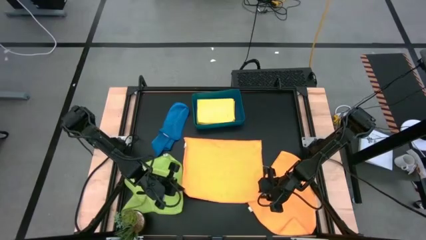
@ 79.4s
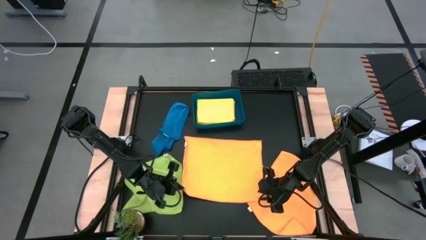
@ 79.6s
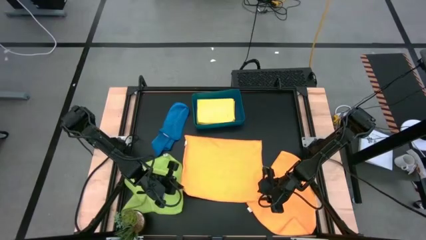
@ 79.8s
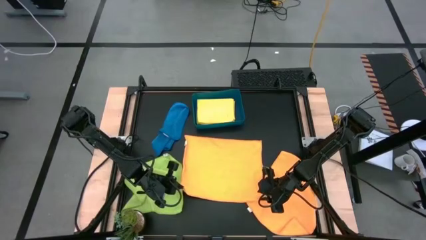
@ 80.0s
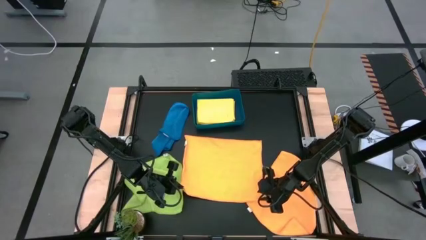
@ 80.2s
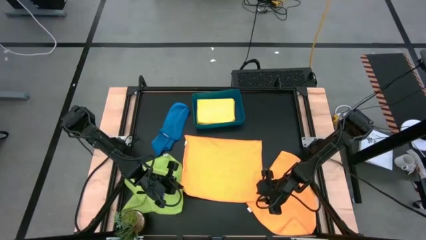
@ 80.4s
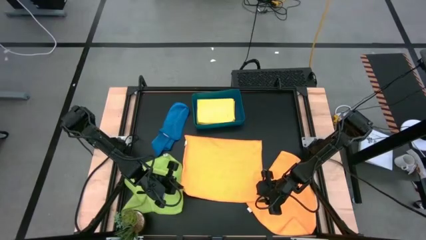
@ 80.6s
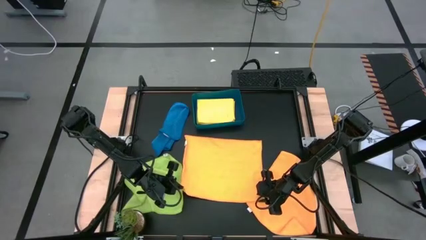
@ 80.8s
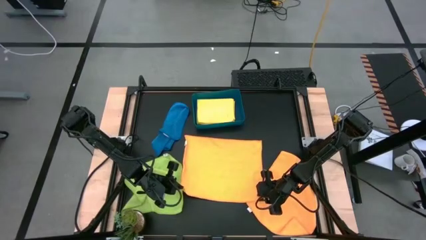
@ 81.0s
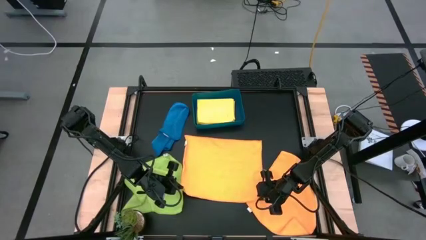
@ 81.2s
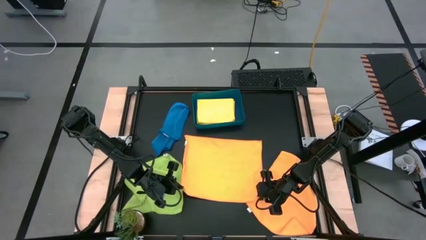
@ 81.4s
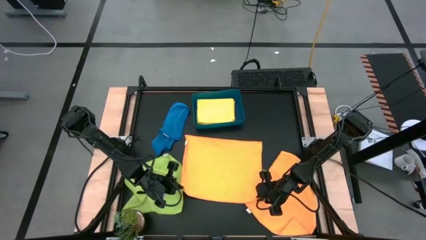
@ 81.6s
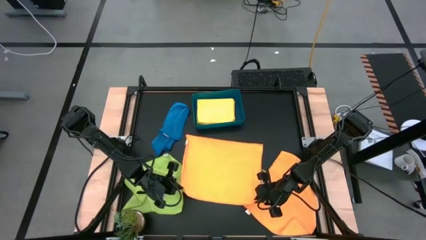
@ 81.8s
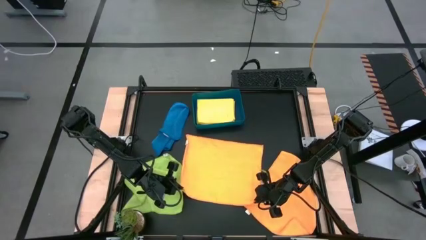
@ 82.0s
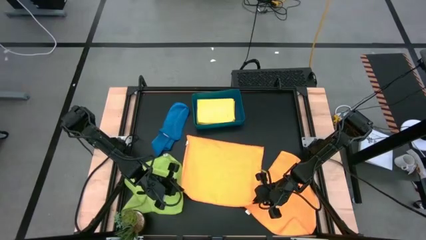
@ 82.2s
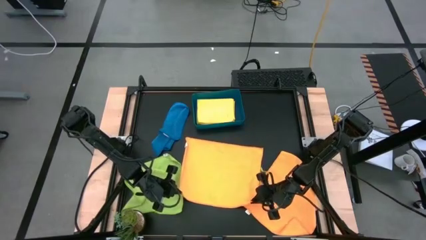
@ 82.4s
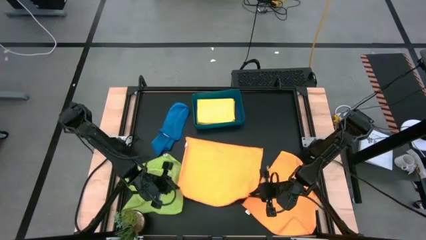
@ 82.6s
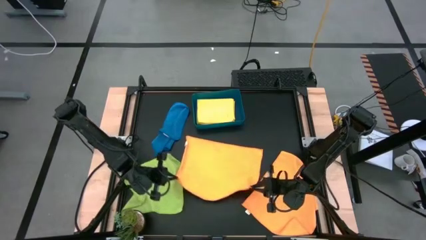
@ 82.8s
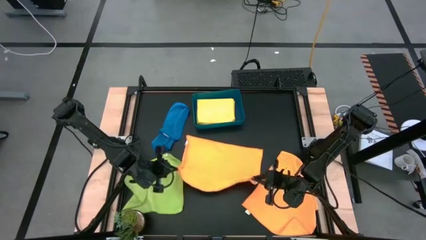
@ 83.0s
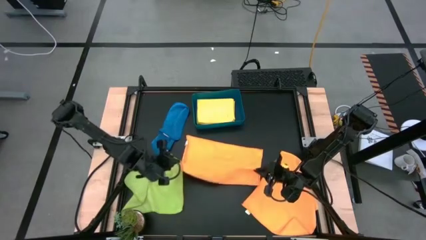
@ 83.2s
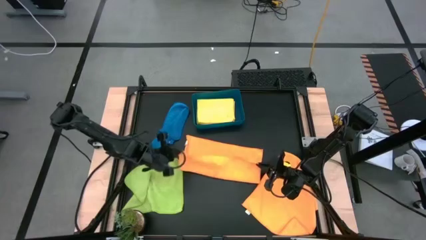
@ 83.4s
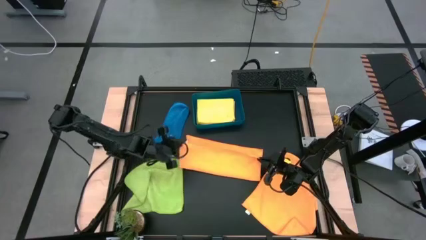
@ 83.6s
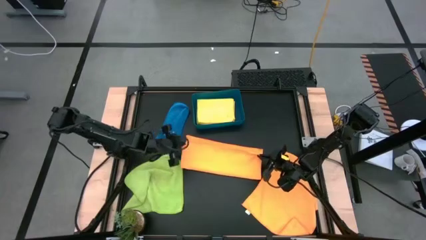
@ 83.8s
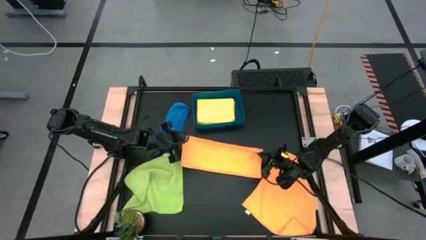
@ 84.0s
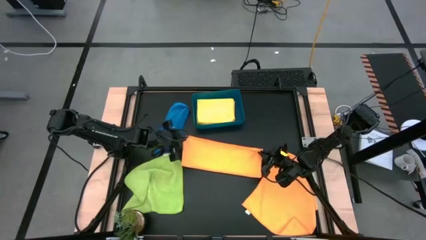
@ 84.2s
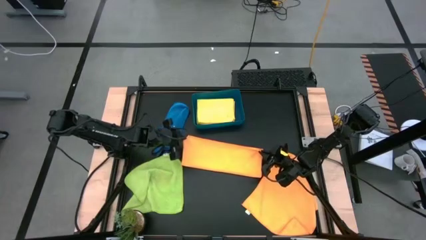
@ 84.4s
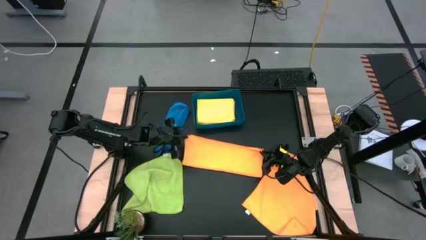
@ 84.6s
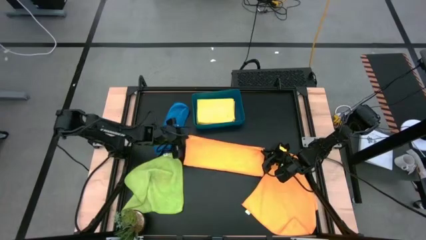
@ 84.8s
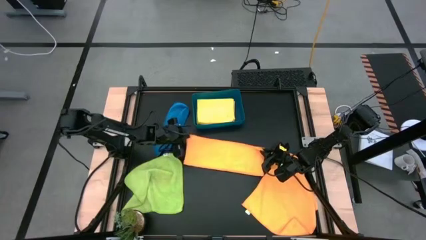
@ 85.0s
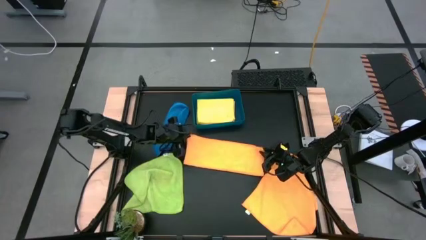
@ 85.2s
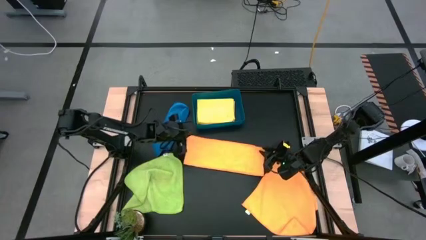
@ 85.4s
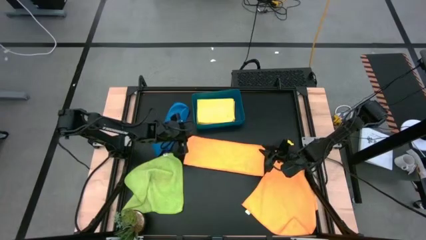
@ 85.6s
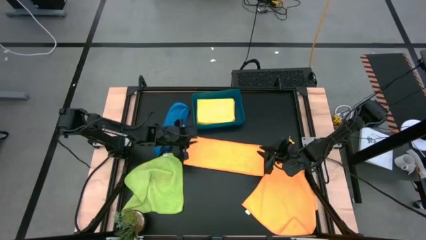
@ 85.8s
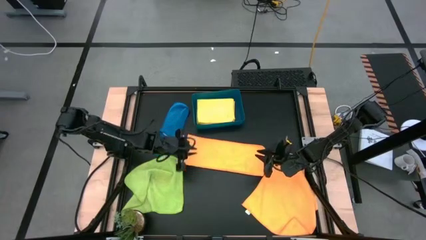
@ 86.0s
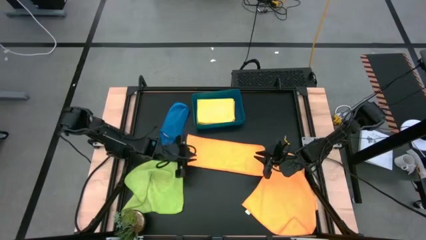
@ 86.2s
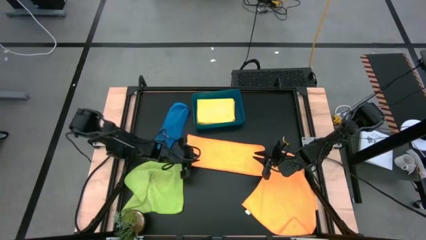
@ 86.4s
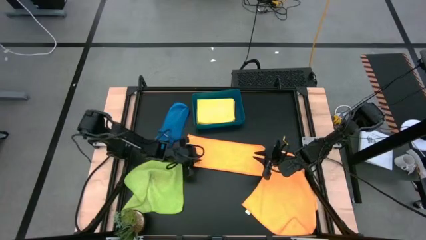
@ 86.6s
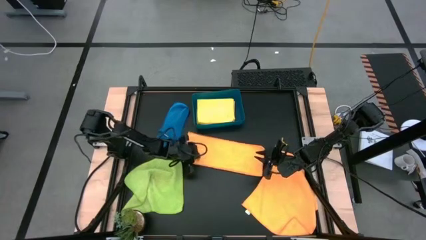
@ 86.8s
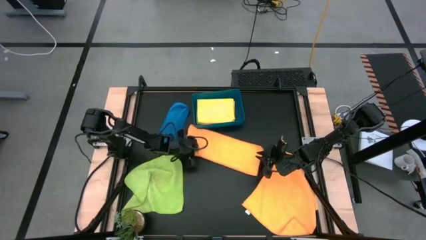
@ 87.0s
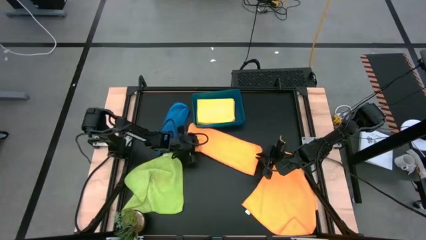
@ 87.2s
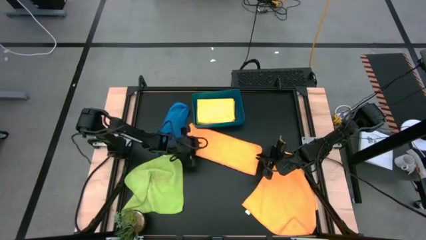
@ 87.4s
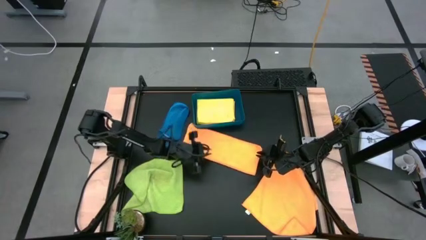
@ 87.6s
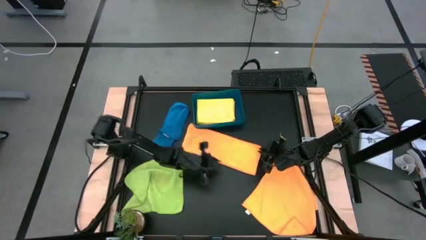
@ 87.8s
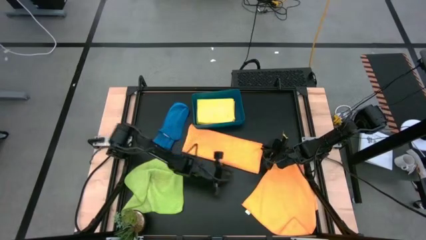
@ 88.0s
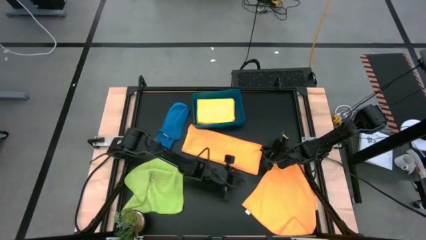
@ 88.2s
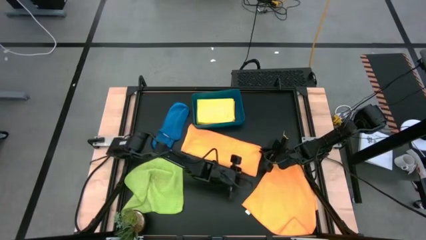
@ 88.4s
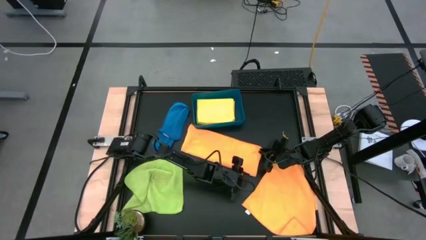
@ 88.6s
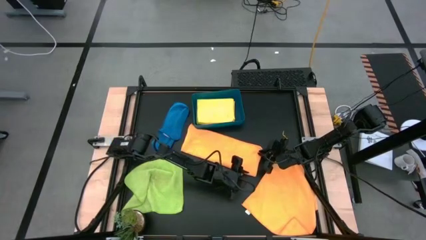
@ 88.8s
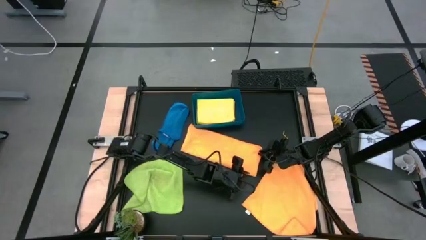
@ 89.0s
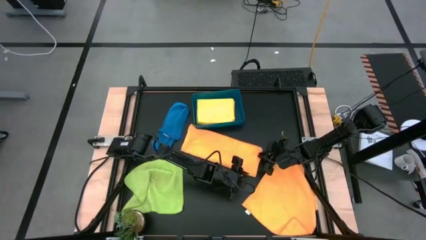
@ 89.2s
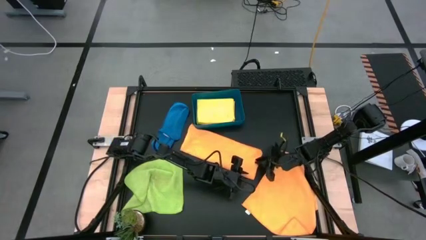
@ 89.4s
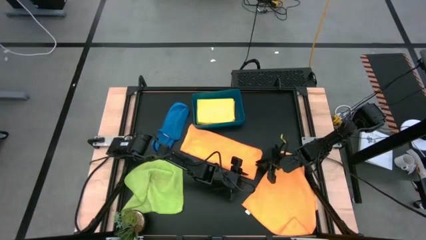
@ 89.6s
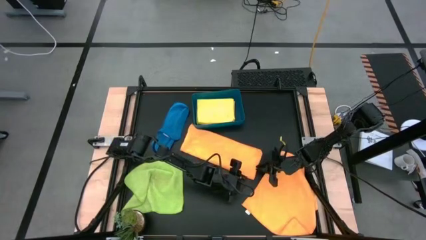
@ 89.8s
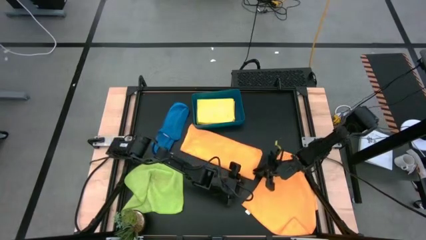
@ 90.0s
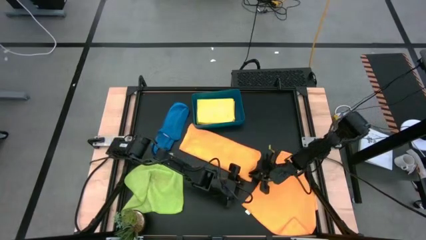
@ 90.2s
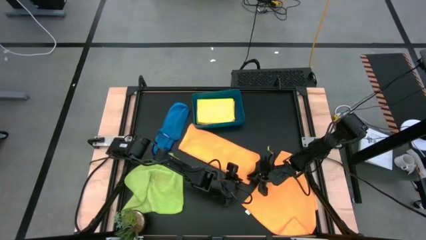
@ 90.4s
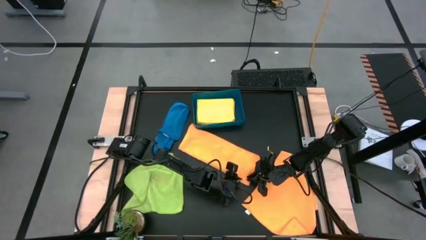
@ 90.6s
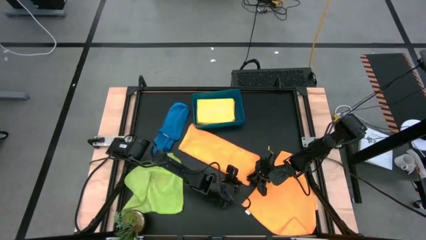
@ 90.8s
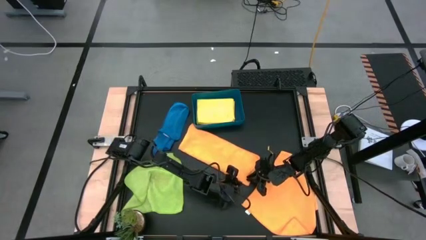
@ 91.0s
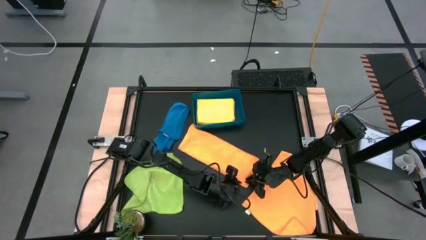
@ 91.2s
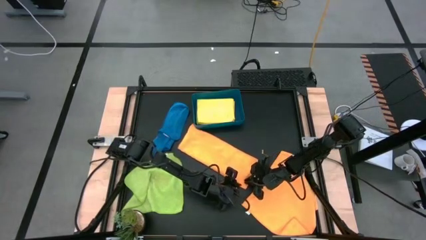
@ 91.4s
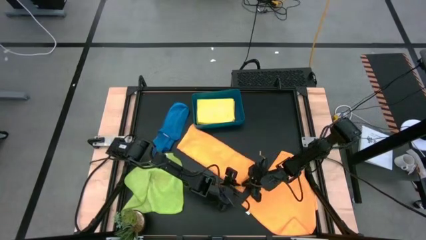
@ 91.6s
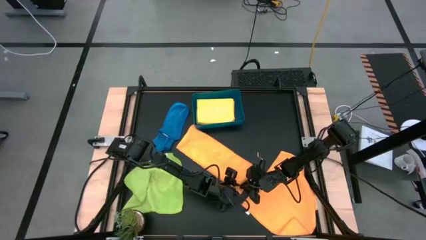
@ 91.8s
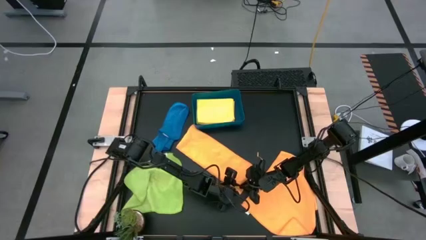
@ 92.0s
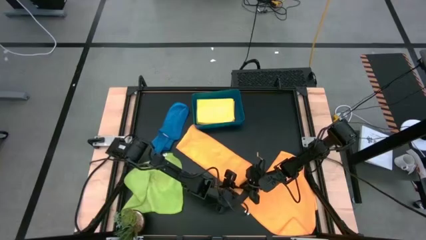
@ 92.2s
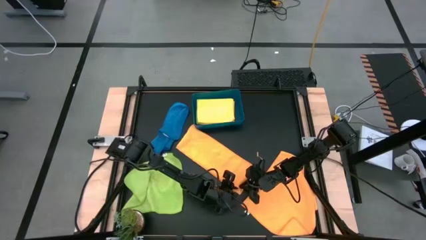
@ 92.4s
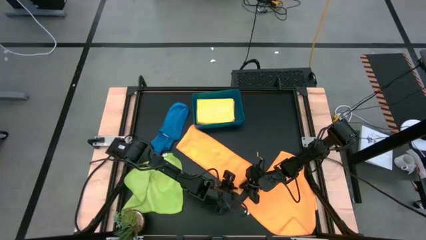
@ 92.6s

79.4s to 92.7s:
Task: Fold microfiber towels
Fold the top orange microfiber cloth
